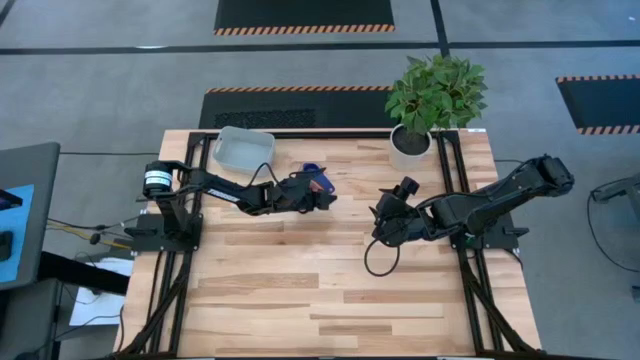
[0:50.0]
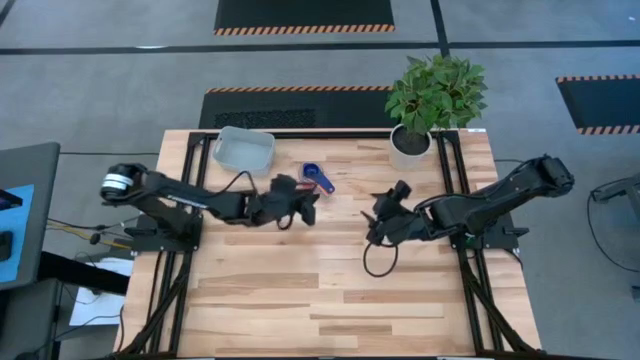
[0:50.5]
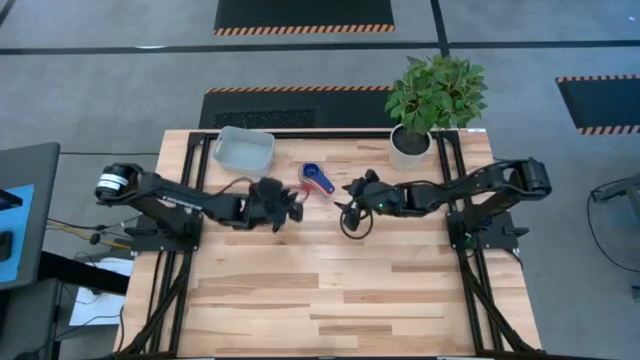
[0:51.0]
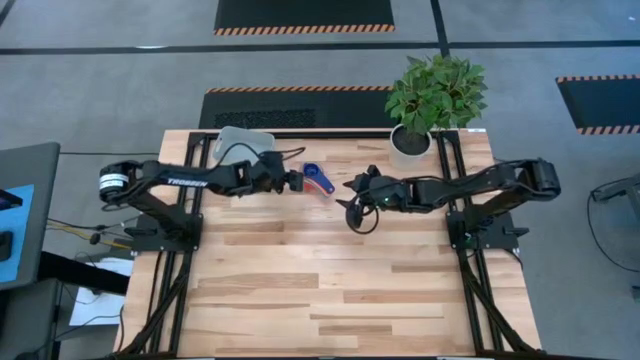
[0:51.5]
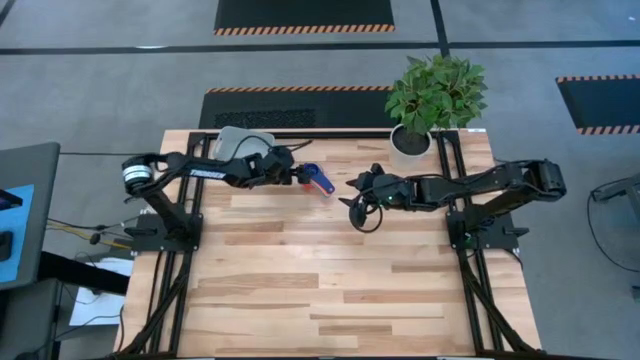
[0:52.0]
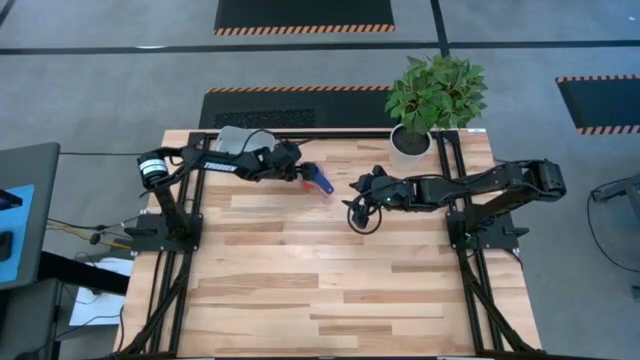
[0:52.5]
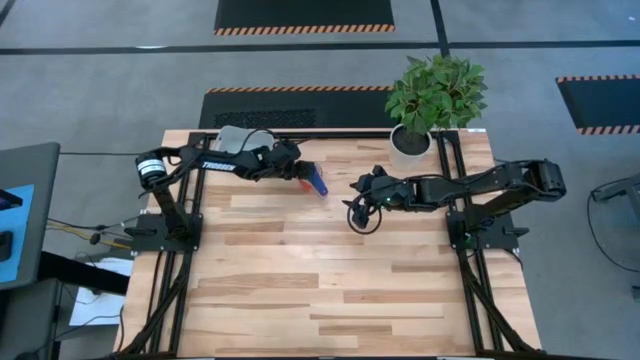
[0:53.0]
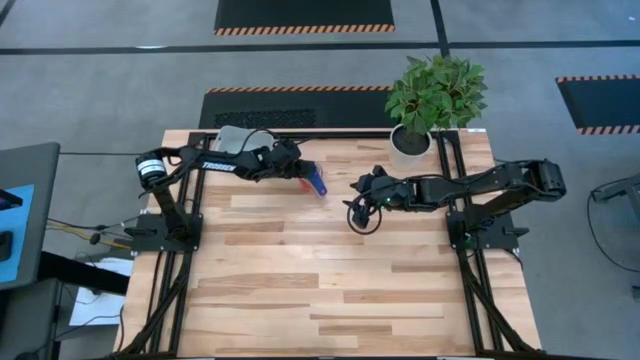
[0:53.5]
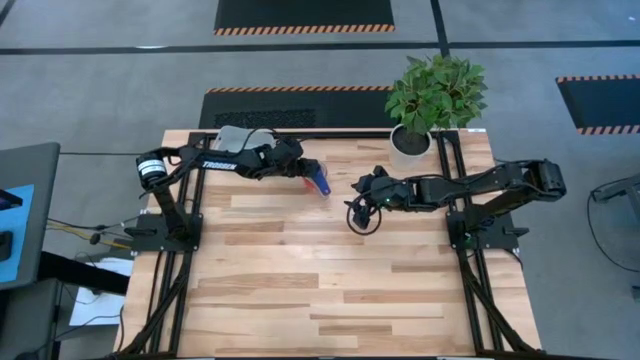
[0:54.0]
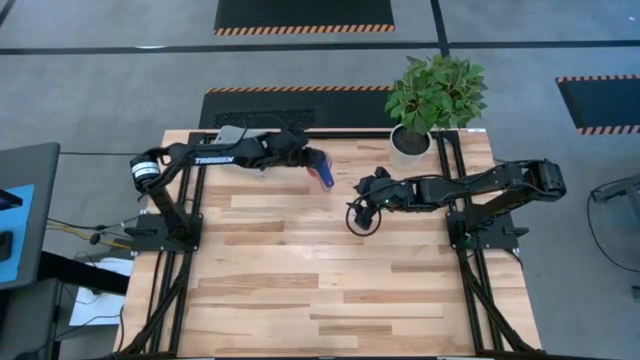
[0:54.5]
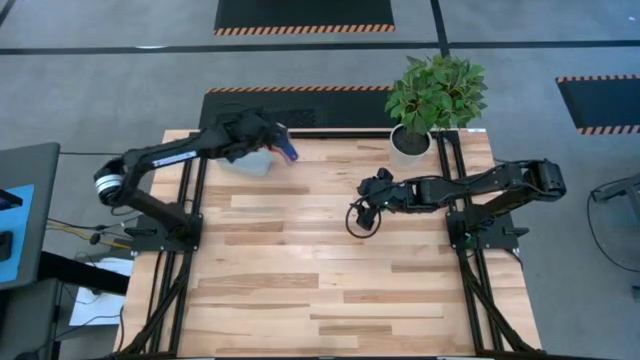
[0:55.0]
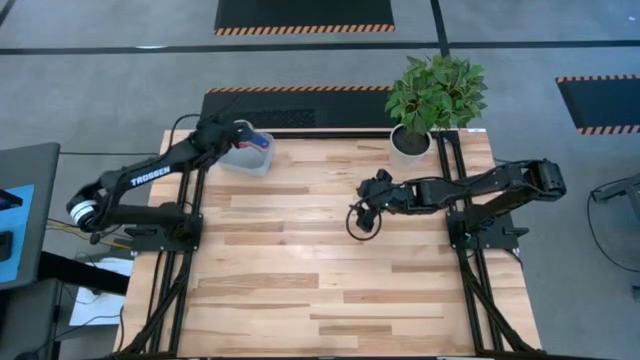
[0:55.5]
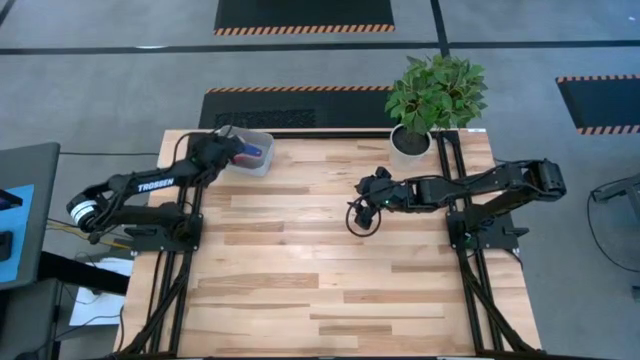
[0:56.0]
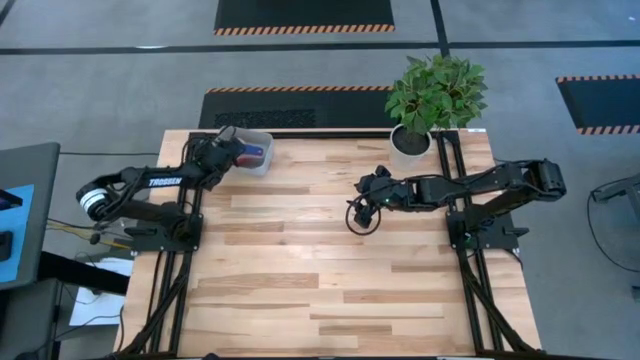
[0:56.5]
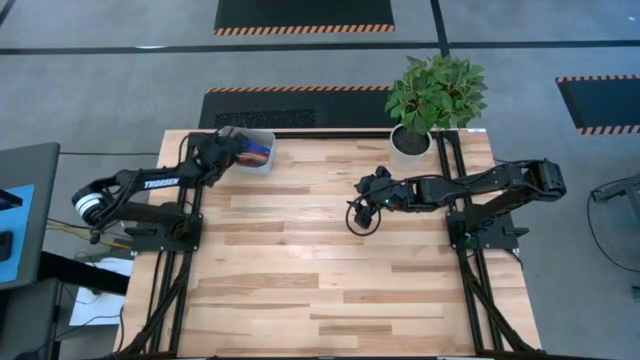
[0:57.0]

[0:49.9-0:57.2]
Task: Nest measuring cups in basket
Put the nested measuring cups into the gray bin

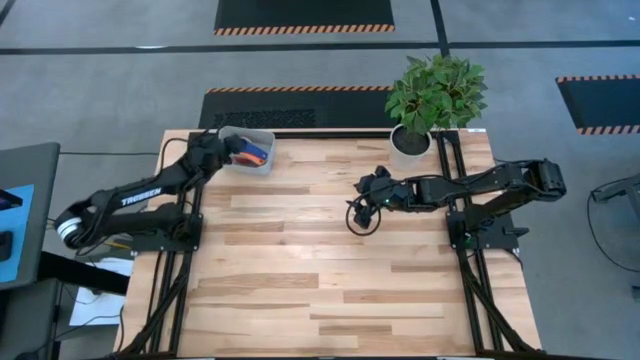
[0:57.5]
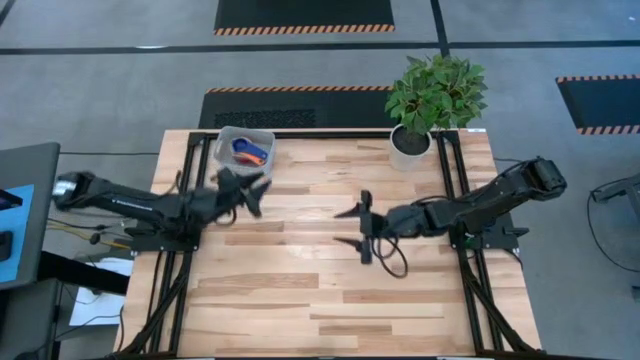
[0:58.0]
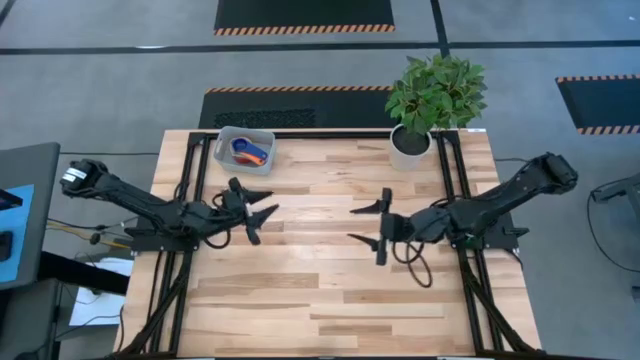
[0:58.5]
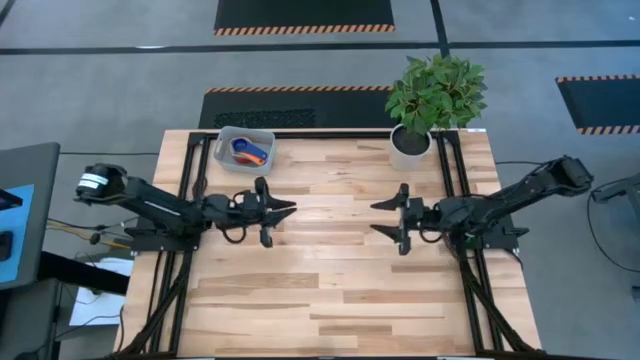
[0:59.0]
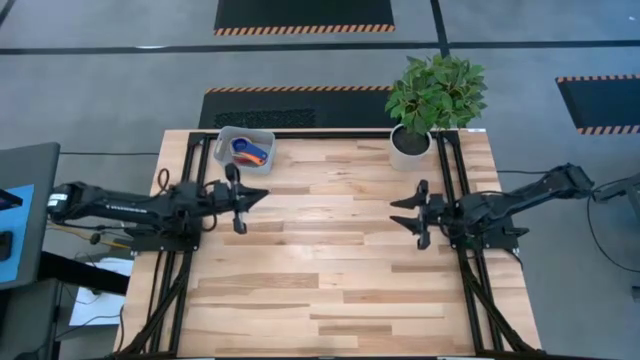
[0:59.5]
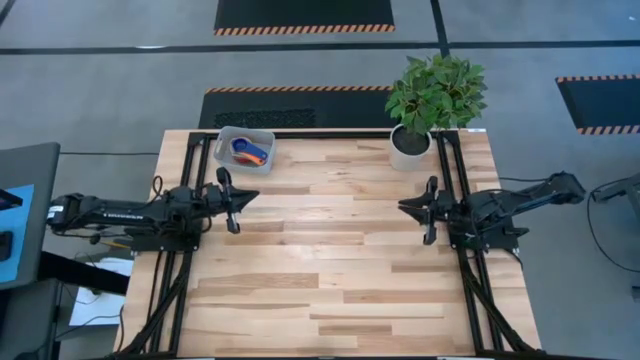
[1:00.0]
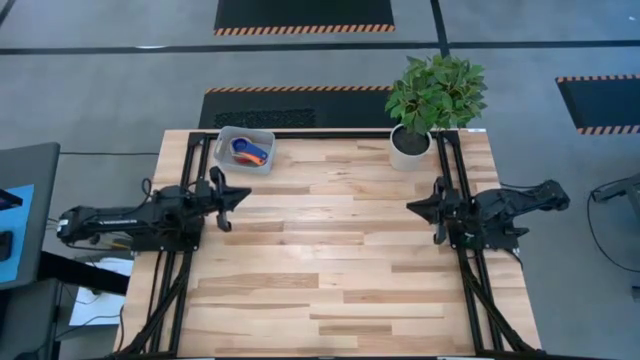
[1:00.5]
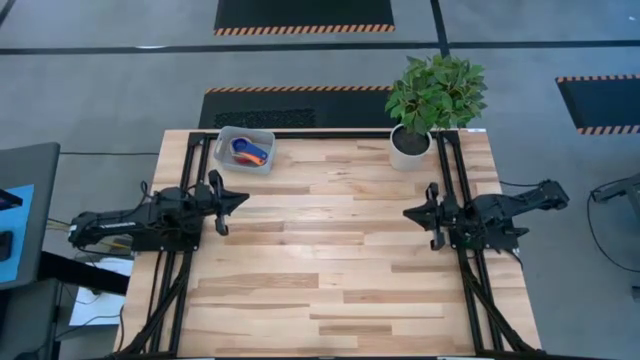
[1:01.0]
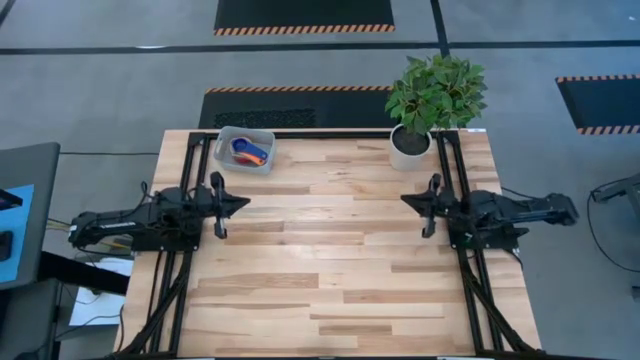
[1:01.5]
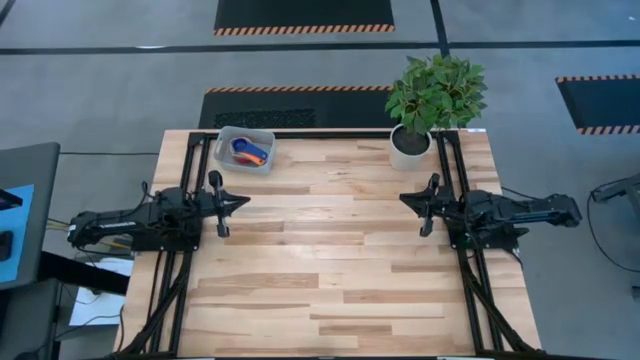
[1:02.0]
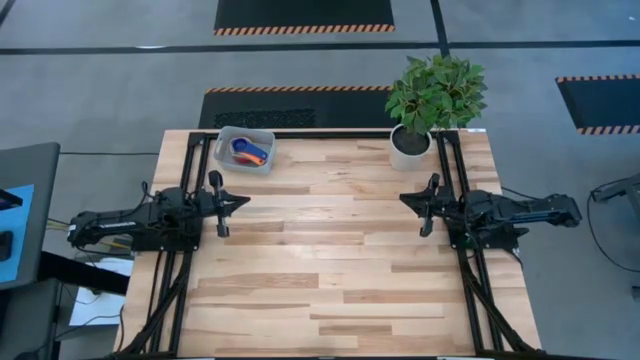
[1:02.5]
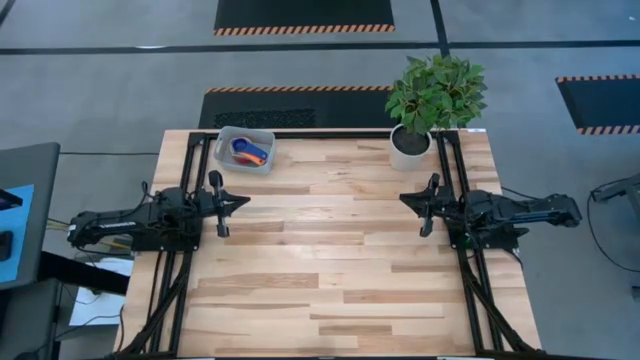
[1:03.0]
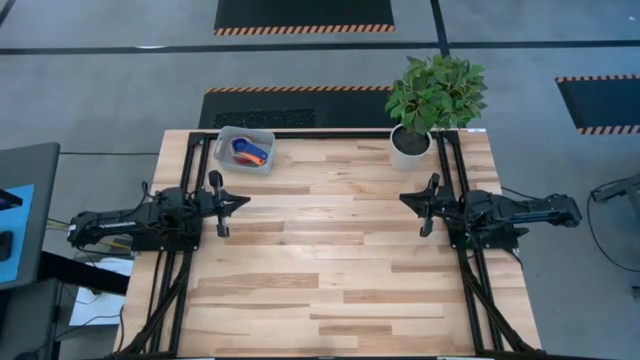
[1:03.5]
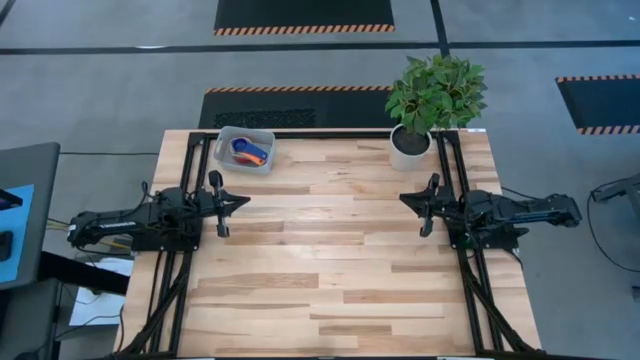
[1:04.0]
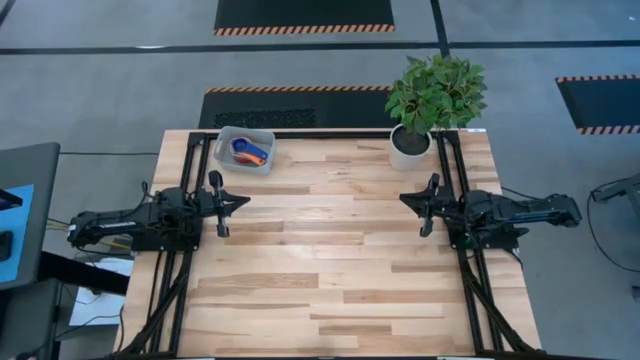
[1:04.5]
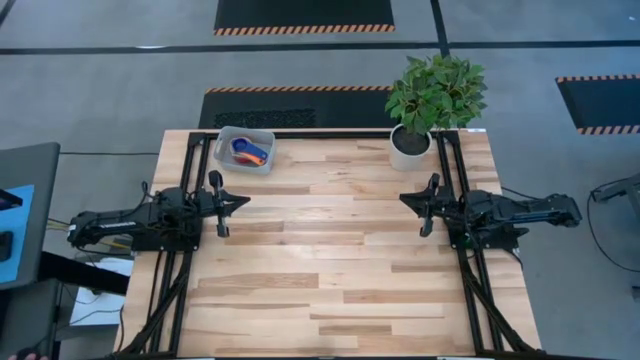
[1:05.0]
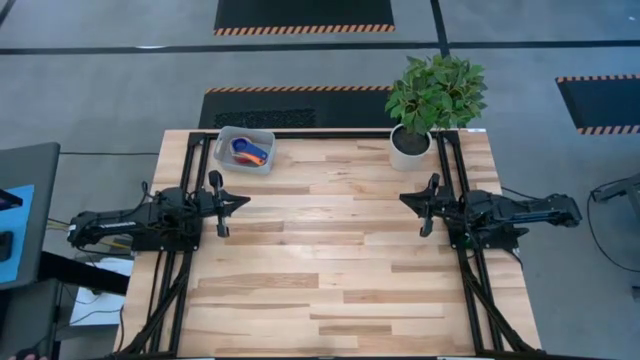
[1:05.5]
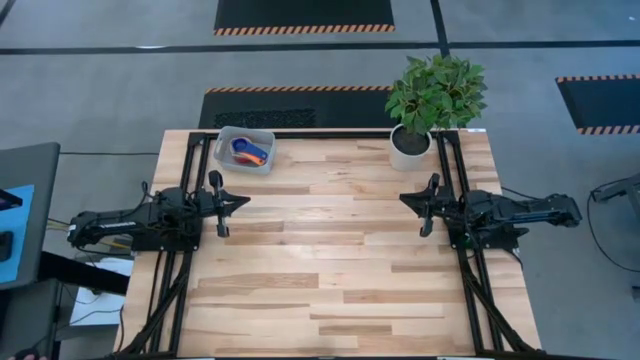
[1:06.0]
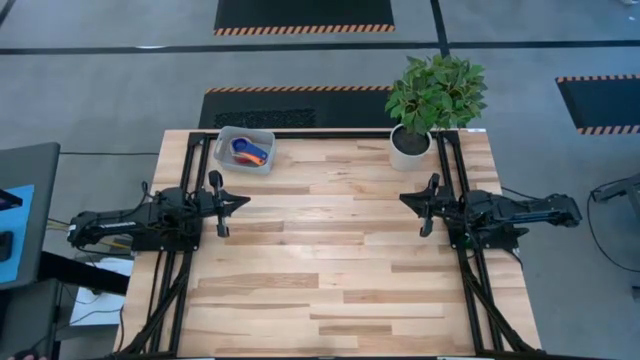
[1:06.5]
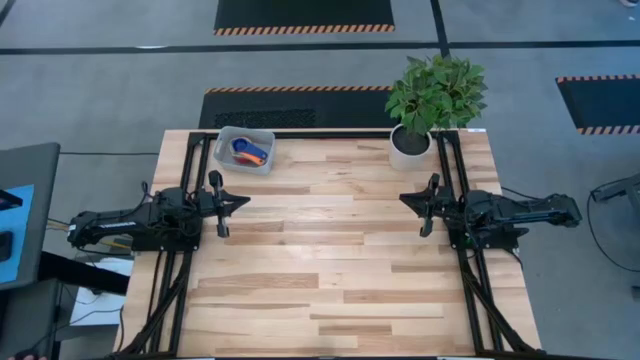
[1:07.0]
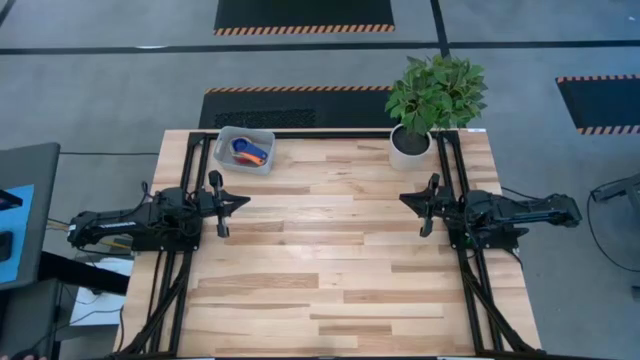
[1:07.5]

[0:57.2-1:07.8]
Return to Home Position

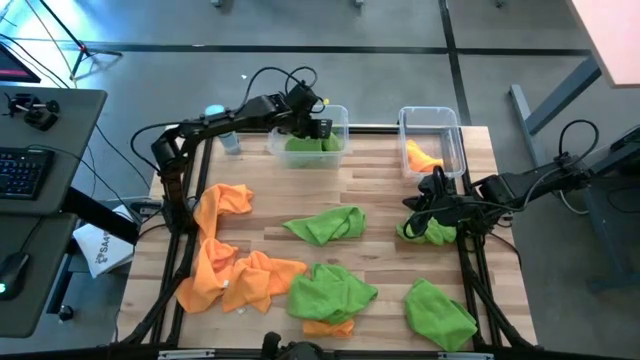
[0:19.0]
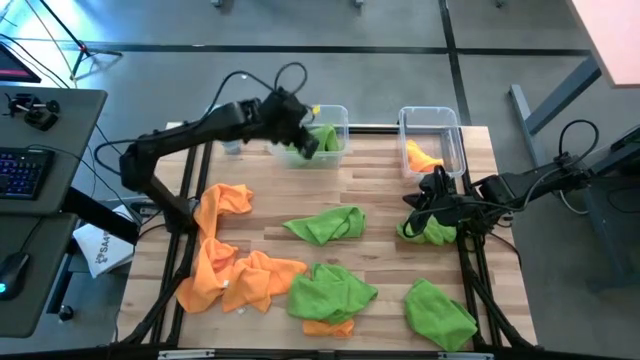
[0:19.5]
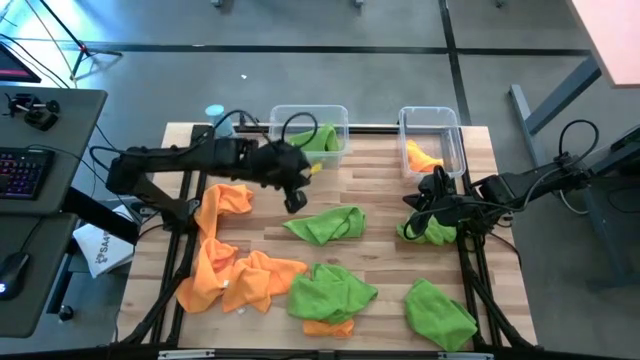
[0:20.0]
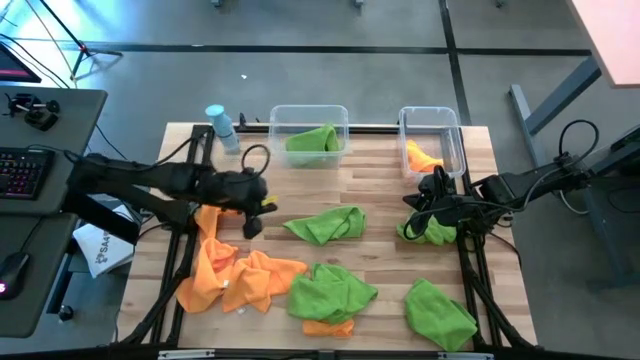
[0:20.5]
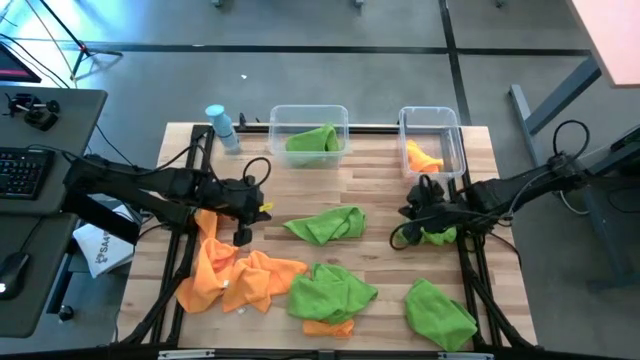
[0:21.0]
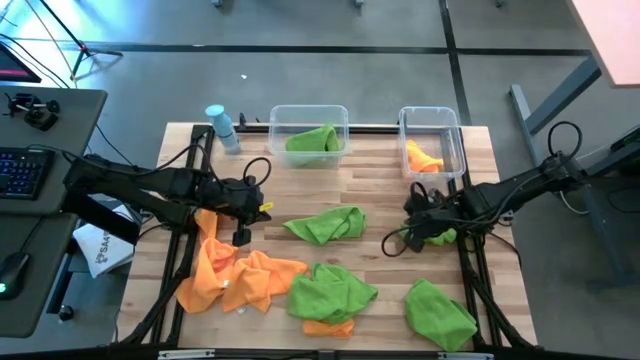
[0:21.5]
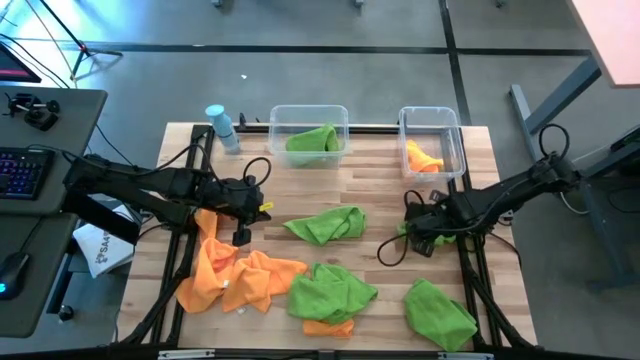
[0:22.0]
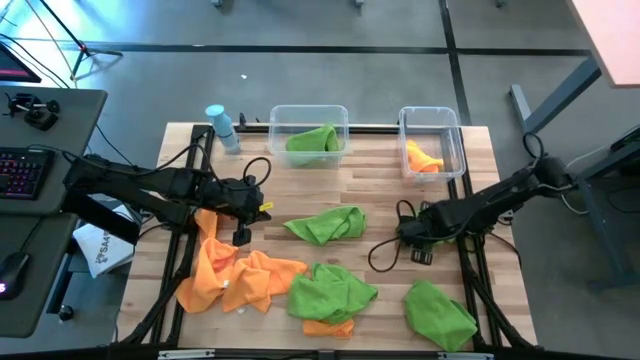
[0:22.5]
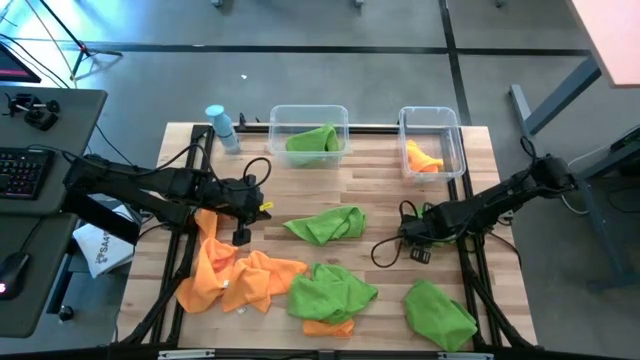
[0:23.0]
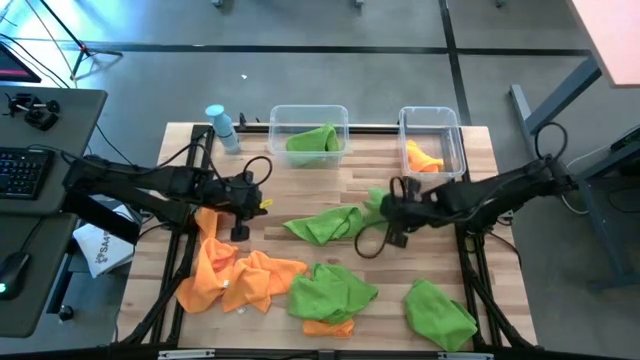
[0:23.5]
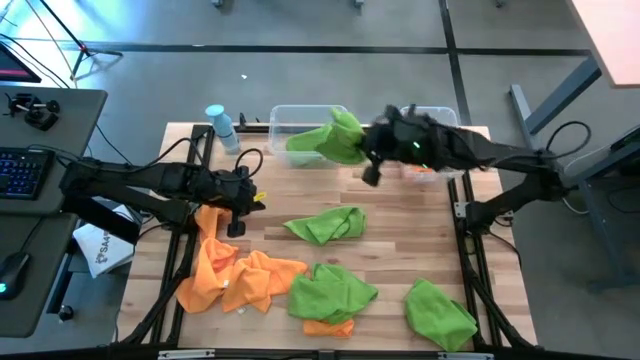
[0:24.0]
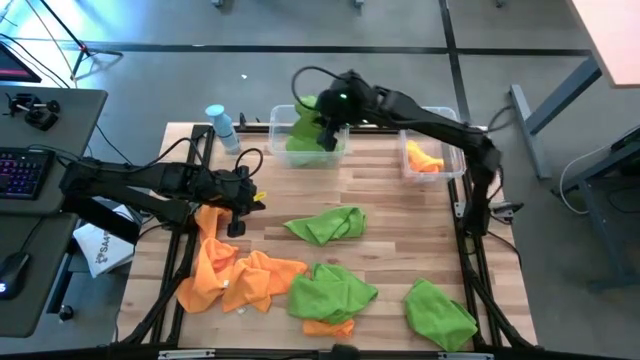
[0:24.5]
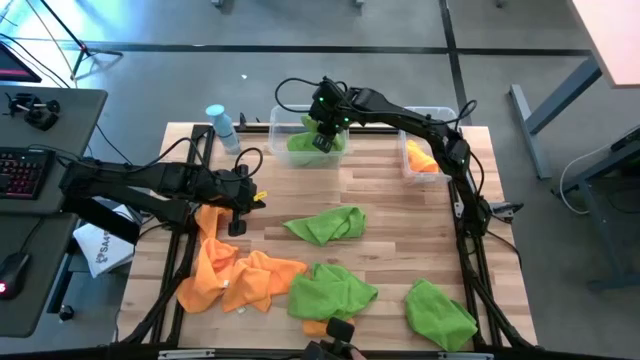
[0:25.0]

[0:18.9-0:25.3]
Task: Sort microfiber towel by color & place in baskets
Put the green towel into the left transparent bin
